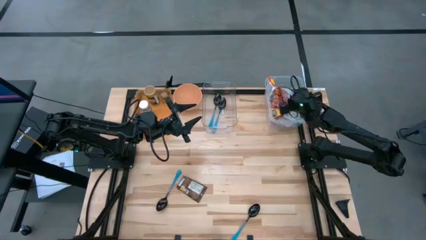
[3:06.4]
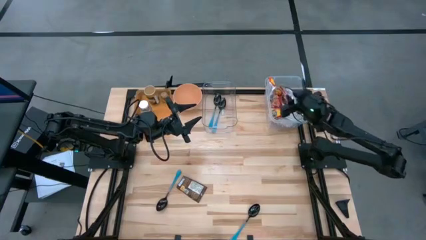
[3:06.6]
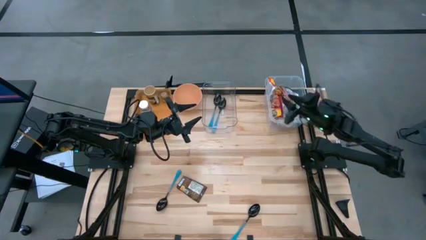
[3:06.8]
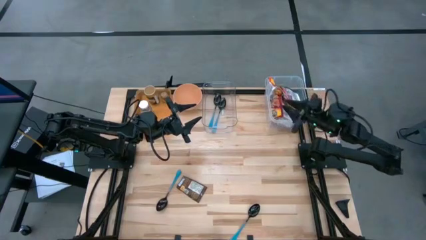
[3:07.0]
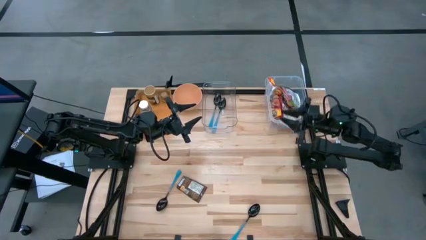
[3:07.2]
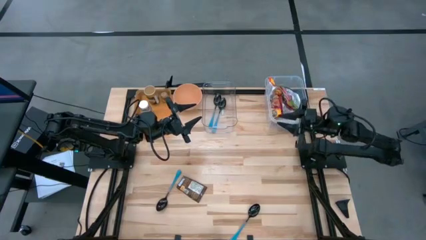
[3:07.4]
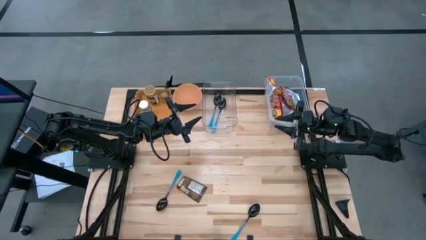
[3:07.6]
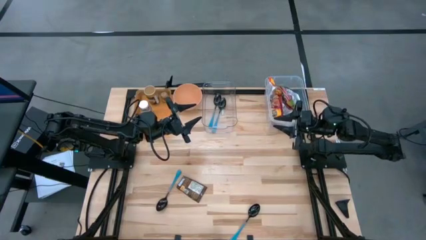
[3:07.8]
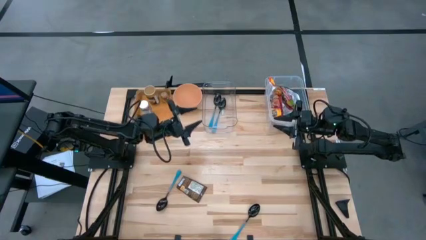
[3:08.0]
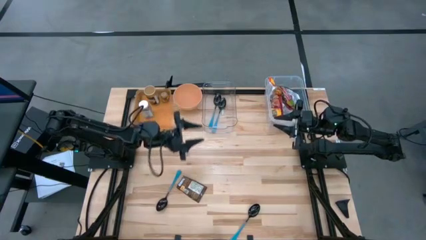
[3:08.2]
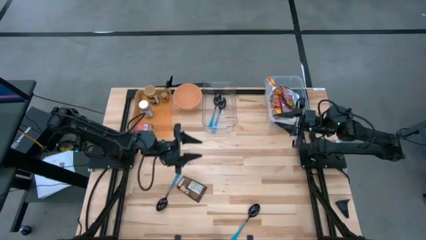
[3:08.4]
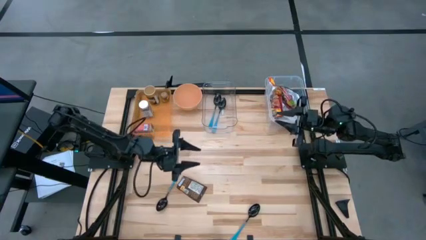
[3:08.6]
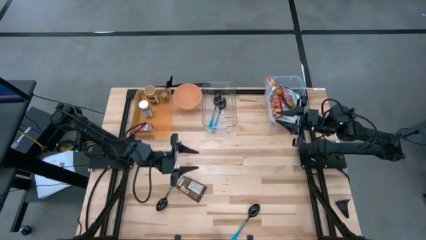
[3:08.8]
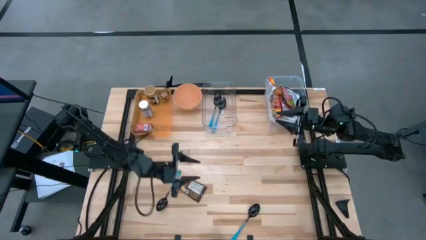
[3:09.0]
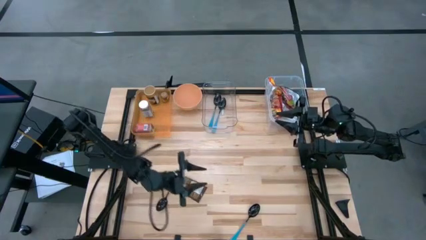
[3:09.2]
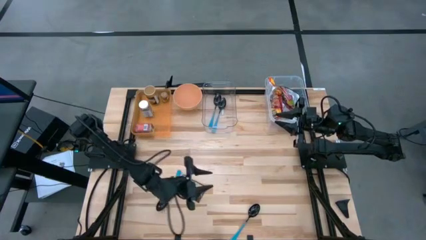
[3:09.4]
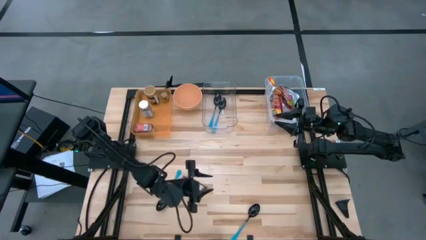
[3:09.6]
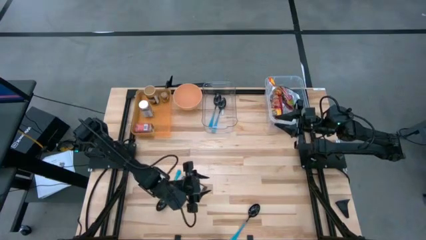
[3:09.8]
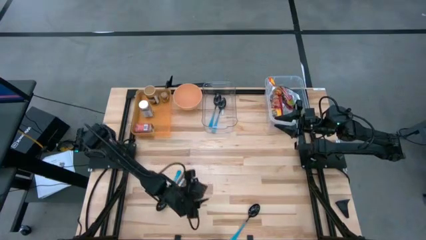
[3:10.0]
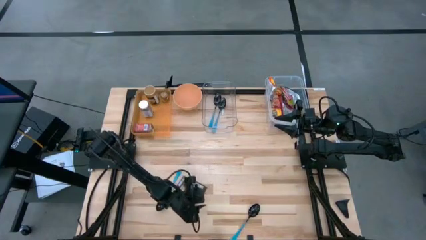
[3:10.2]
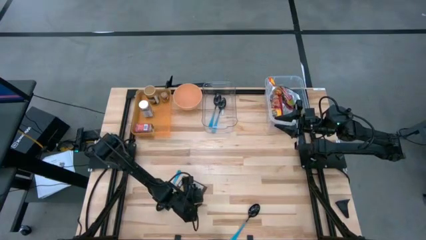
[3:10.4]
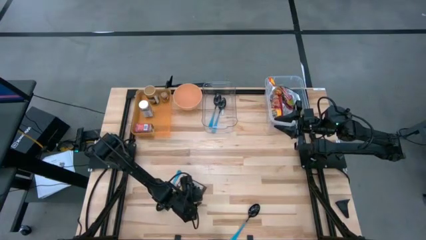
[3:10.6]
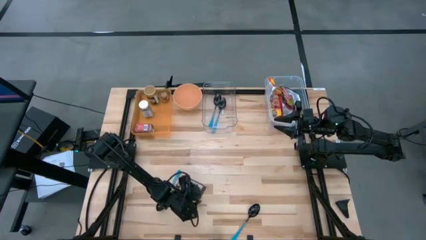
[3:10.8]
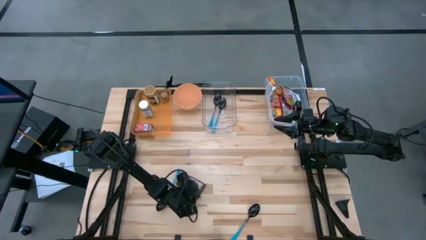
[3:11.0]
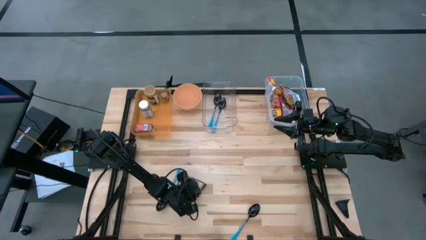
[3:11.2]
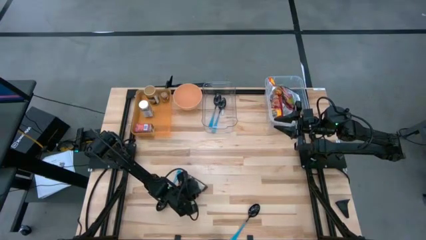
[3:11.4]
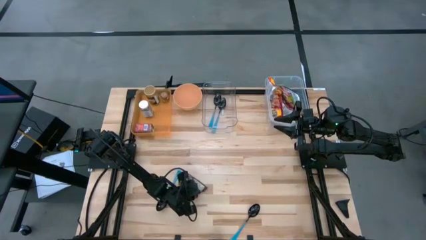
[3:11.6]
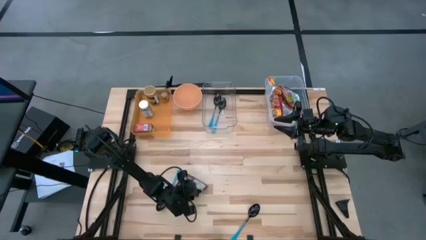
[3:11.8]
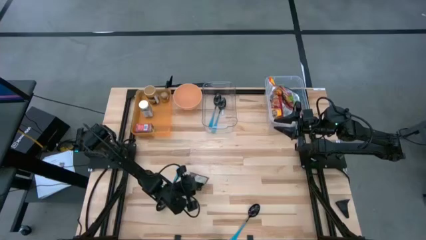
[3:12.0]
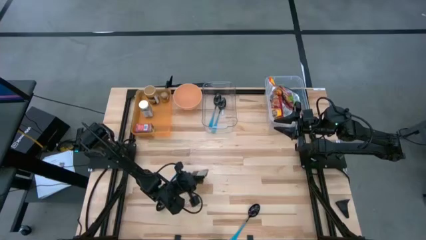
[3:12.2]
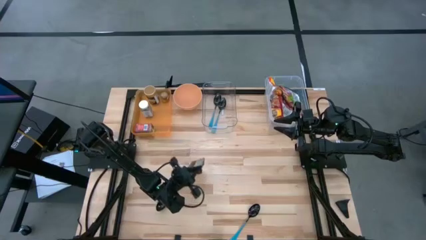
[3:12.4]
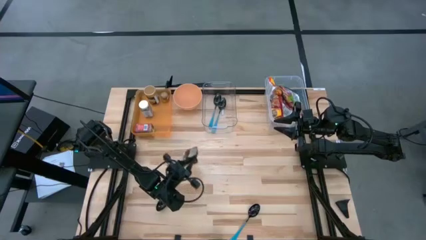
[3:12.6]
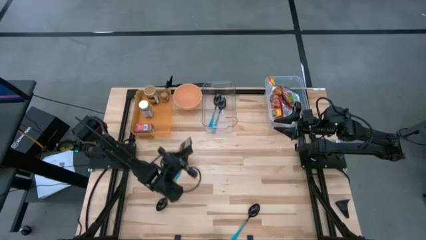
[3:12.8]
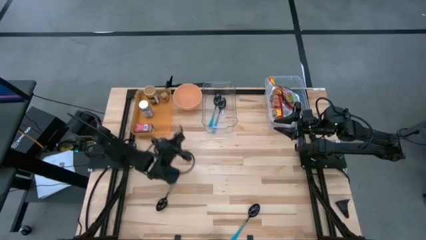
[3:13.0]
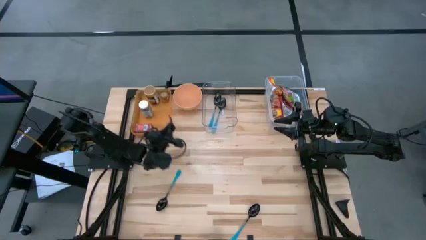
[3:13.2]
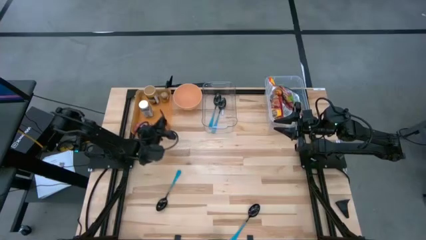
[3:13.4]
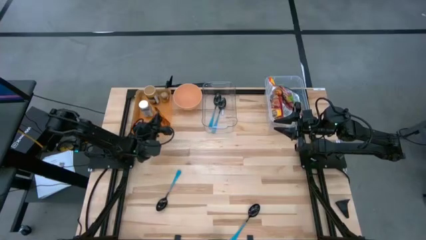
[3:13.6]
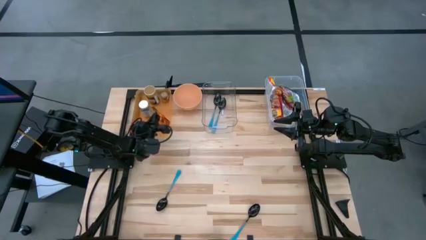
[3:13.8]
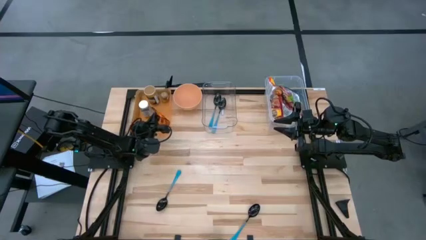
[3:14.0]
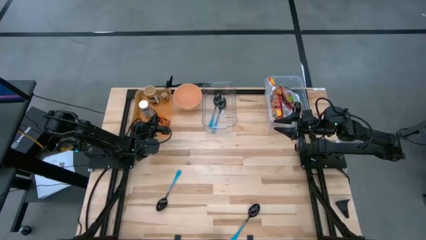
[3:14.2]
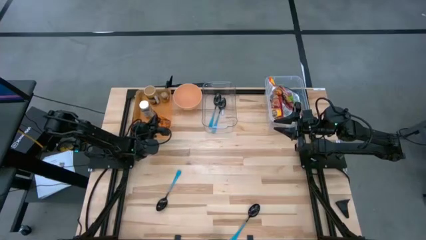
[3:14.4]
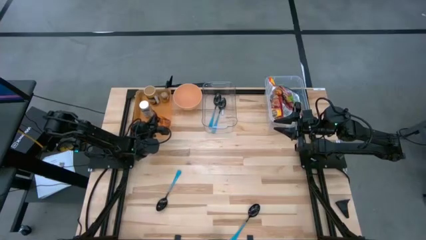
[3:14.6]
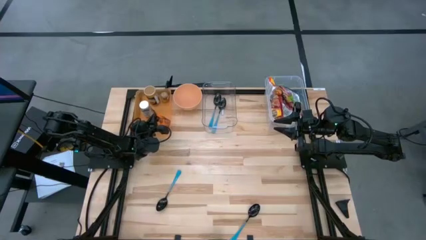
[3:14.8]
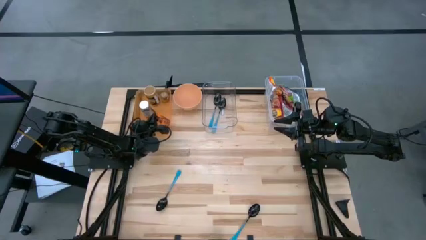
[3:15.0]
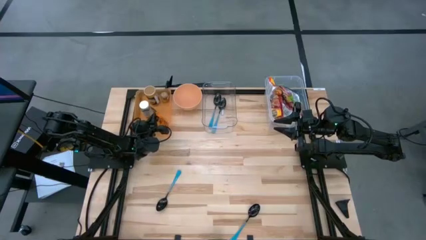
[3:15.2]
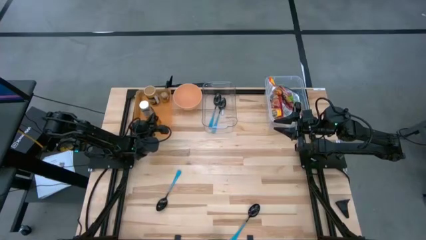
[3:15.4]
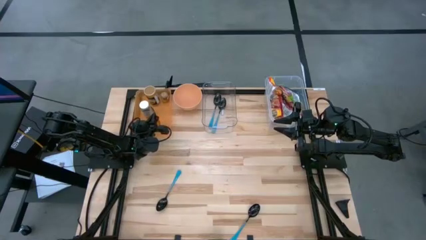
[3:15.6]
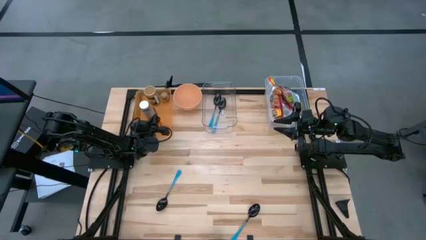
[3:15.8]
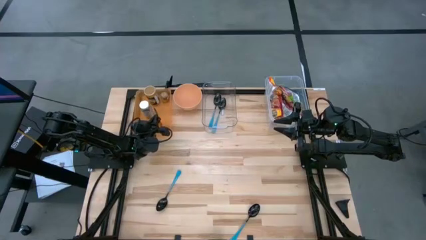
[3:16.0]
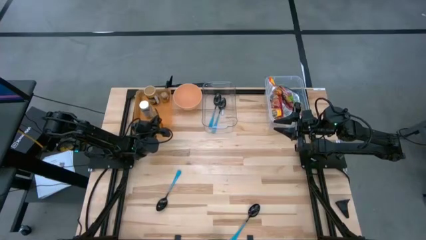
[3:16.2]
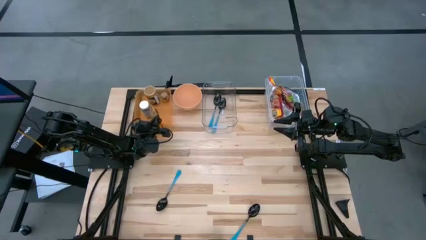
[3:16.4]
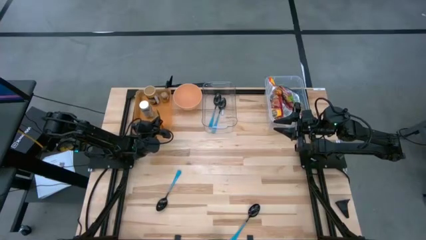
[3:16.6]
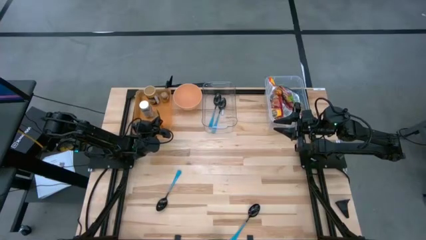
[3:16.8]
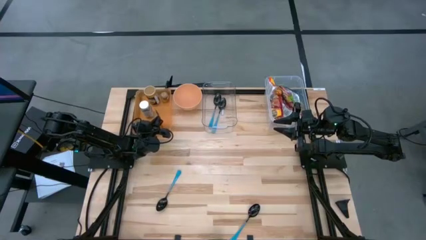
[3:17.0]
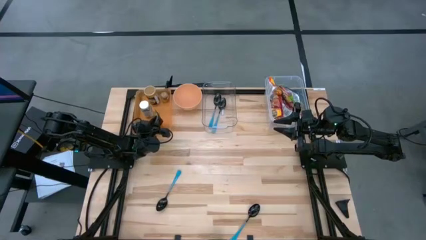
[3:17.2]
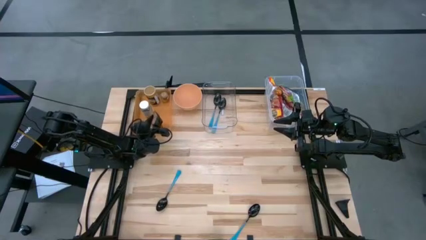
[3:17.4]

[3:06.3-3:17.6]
Task: Pick & Place Food Item
Put the orange seasoning pack into the orange bin

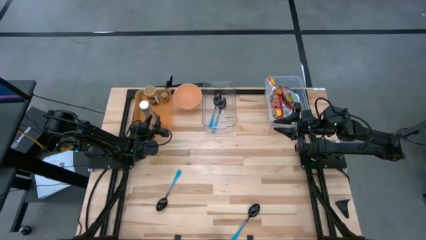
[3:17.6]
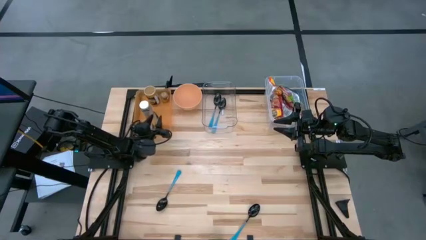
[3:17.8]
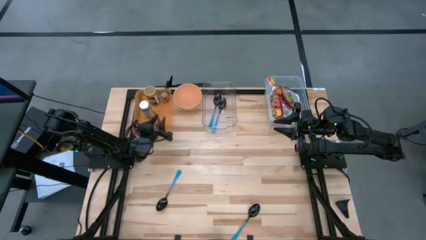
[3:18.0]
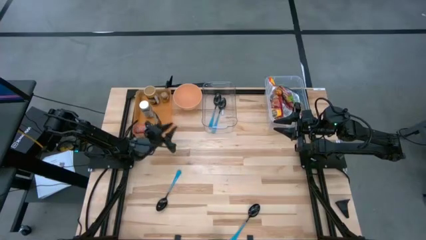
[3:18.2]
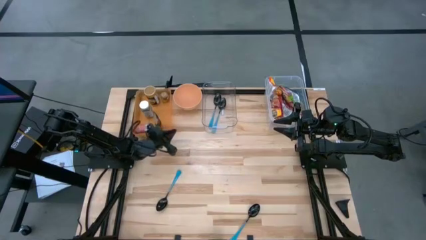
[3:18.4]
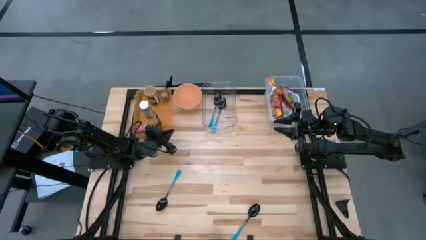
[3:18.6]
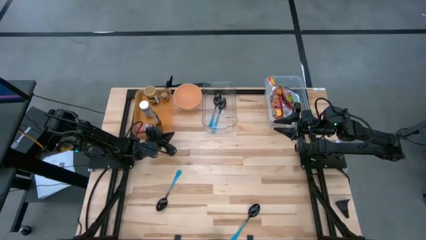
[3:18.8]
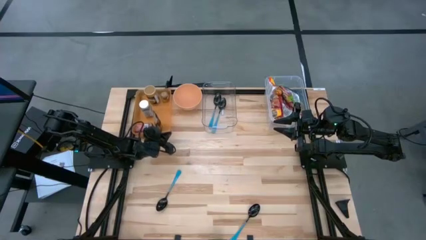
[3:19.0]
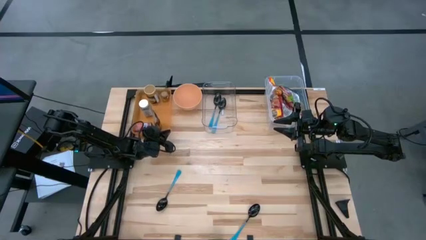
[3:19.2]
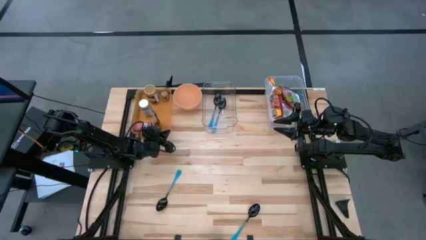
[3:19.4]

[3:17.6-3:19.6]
Adjust the orange bin on the table
